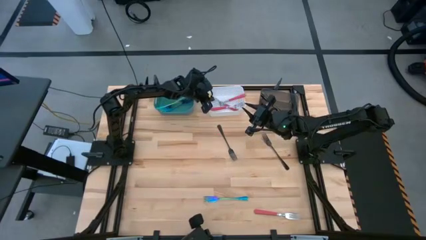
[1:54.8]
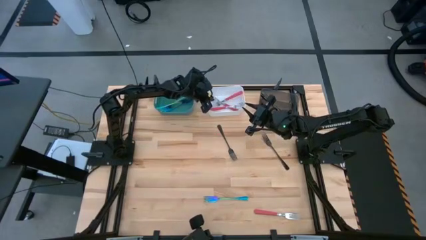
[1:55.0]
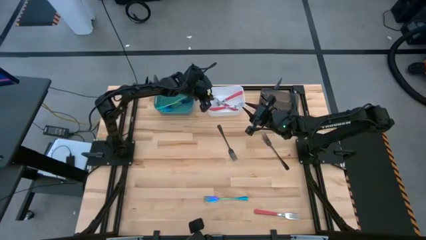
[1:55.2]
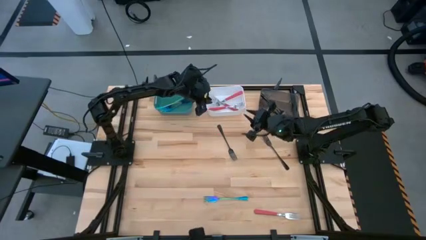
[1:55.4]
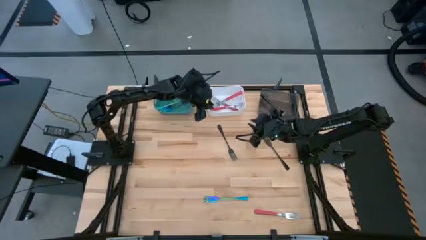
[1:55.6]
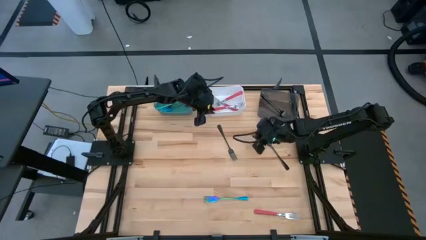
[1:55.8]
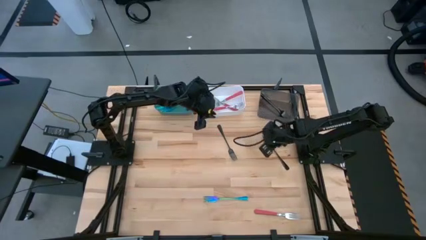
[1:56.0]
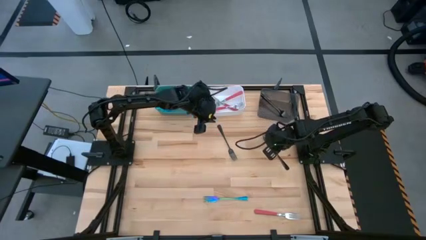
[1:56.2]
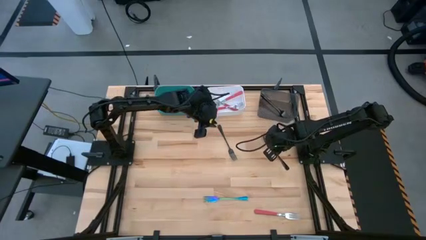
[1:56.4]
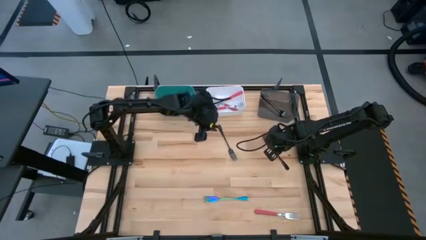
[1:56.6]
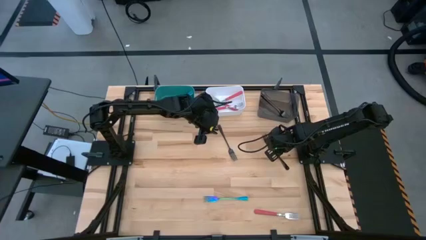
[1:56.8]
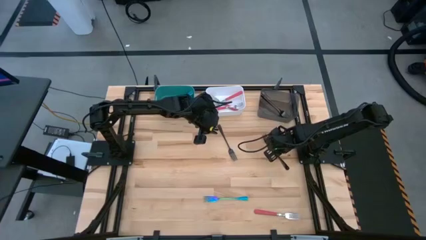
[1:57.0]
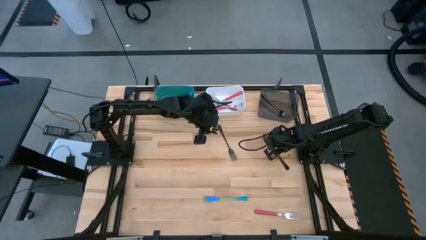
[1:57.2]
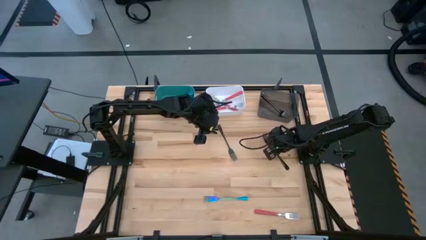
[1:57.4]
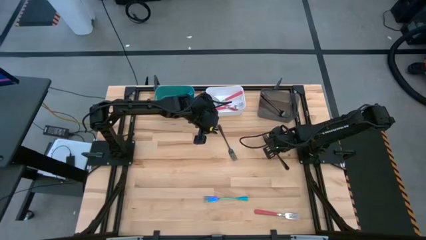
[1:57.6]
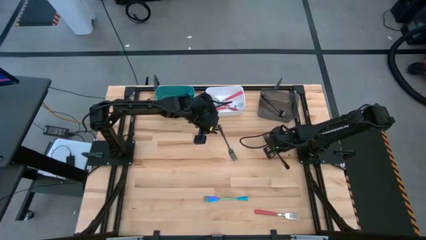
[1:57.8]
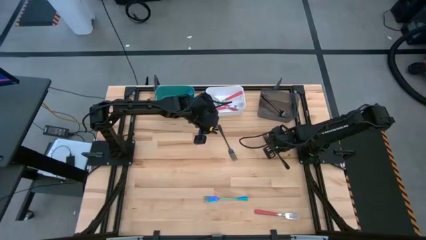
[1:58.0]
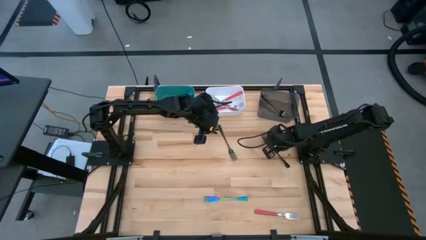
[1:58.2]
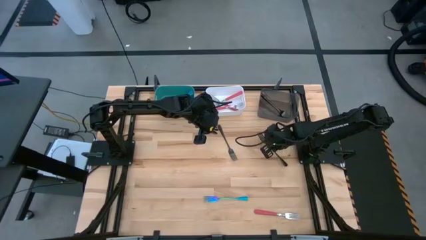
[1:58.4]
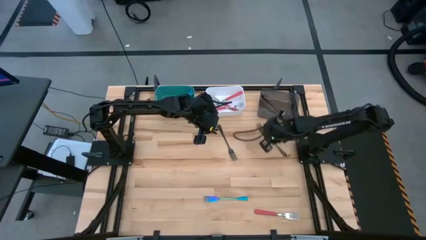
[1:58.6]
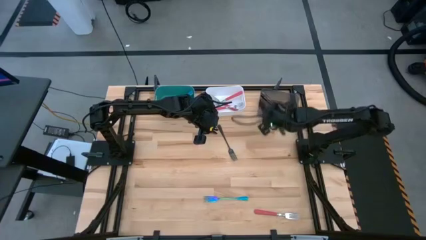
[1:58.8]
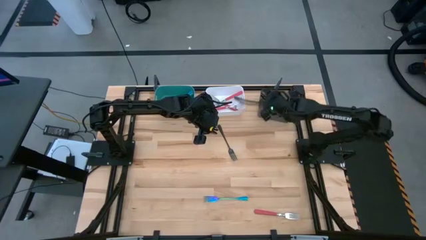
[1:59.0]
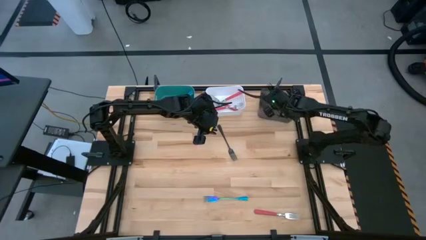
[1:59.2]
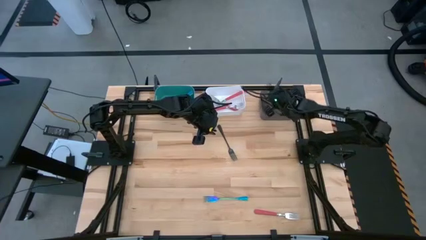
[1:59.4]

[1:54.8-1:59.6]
Task: Sort silverware by color (type)
Put the black fork into the black bin

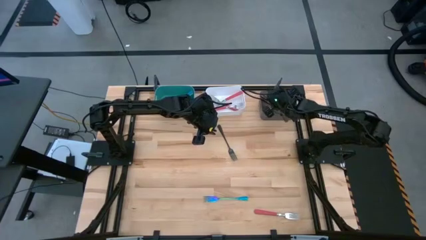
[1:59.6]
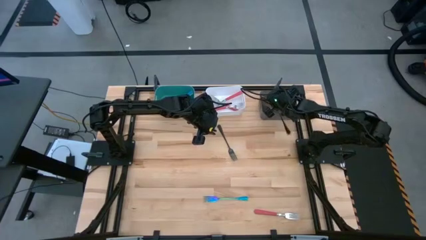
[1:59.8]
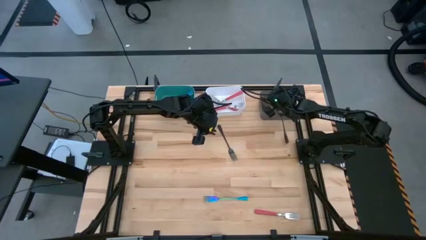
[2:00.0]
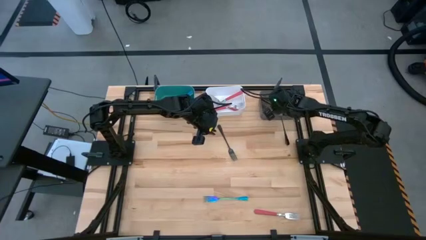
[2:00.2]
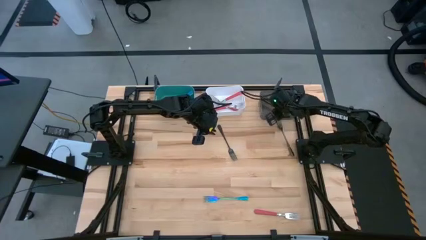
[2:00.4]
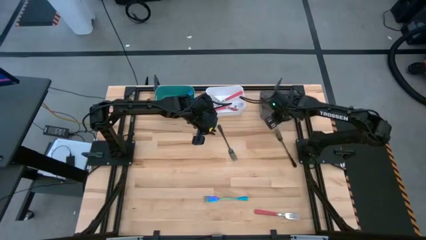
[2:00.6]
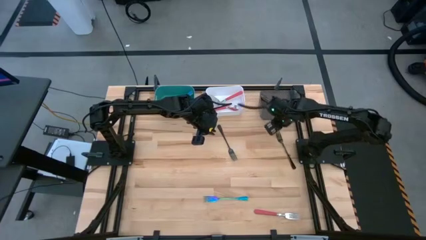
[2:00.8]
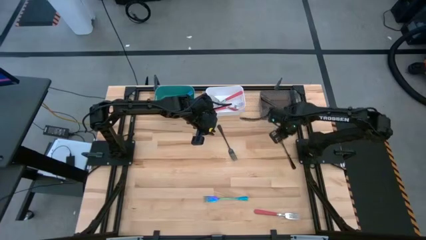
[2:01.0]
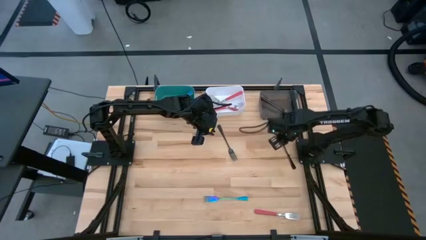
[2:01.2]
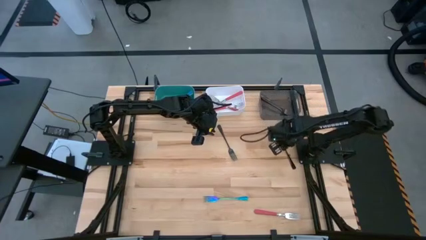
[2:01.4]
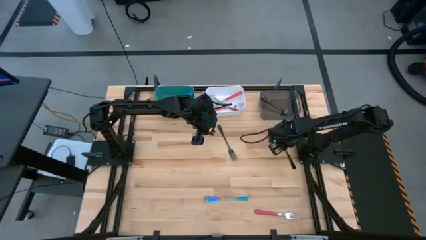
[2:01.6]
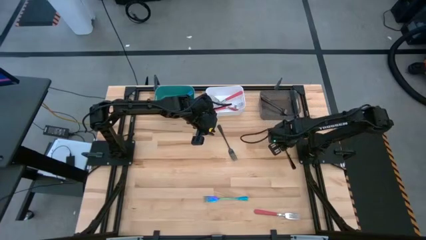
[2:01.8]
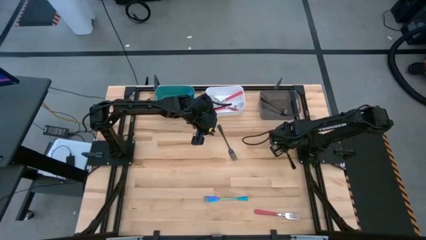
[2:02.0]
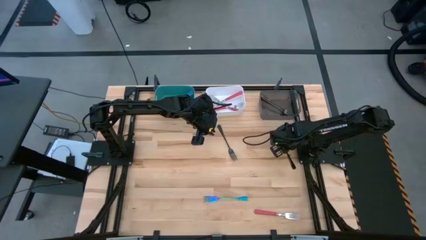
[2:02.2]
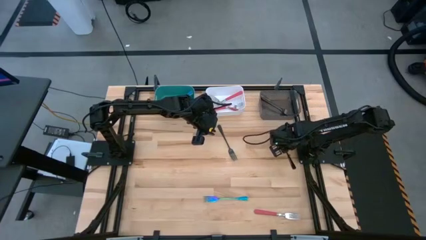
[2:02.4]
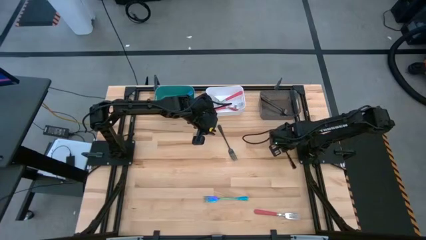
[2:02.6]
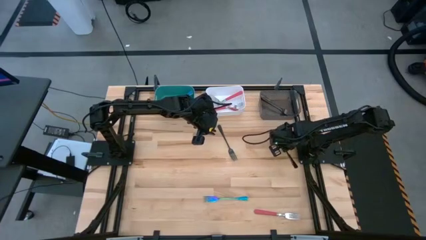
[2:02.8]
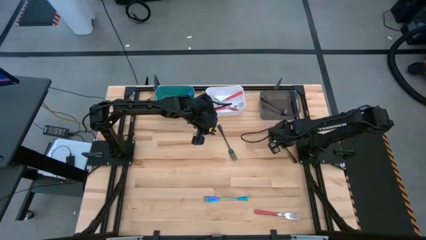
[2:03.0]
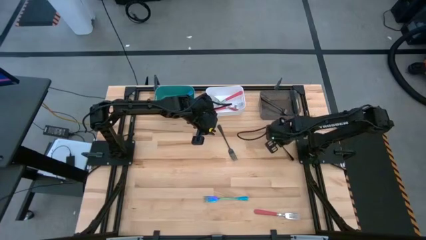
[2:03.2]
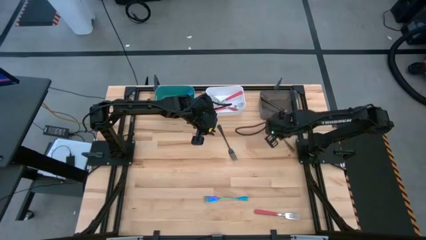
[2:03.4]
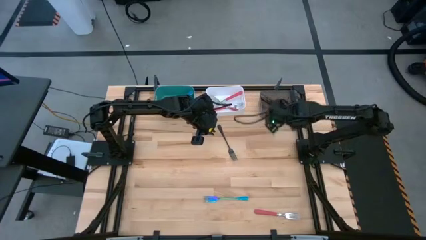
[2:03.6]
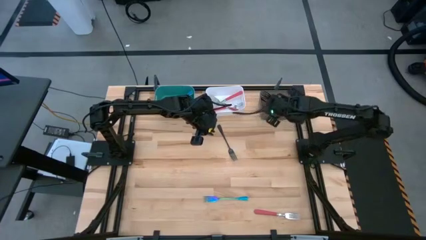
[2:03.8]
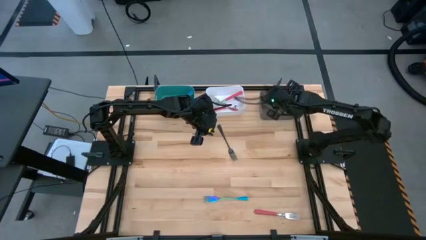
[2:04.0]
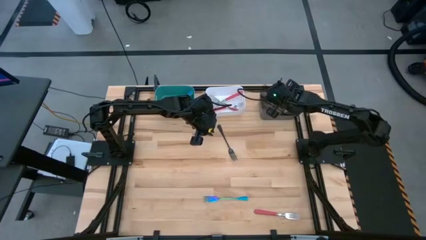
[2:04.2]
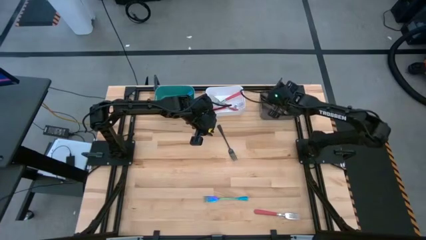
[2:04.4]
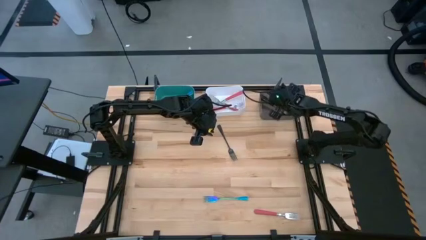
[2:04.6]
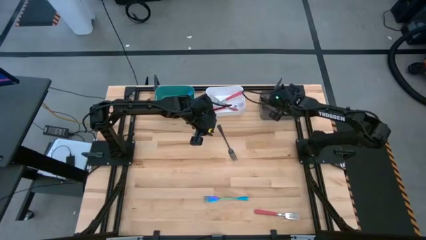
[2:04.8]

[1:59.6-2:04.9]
Put the black fork into the black bin

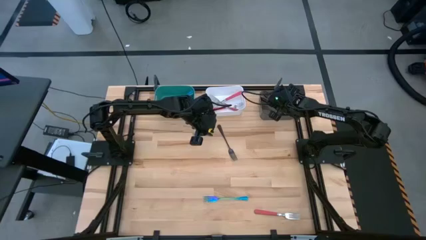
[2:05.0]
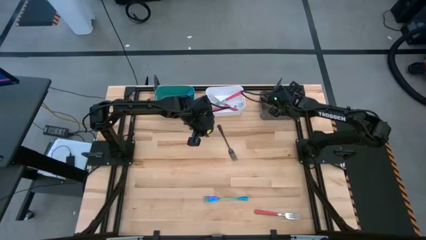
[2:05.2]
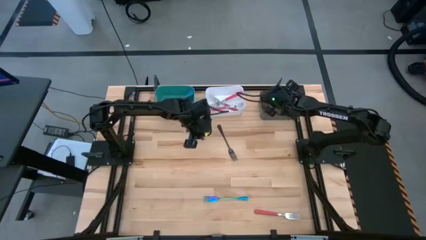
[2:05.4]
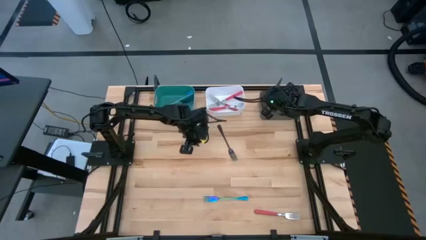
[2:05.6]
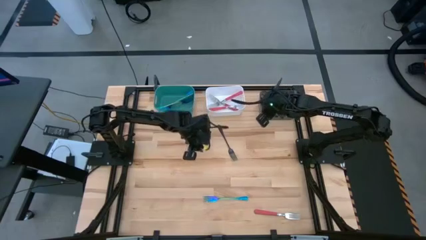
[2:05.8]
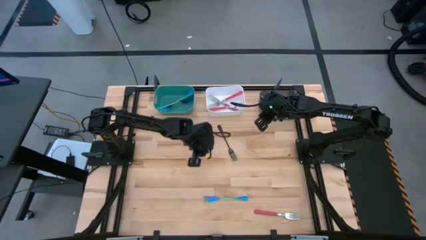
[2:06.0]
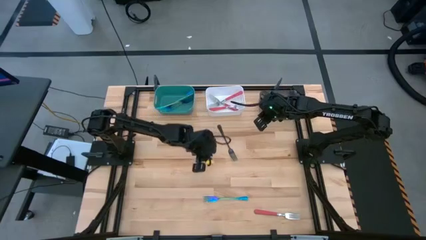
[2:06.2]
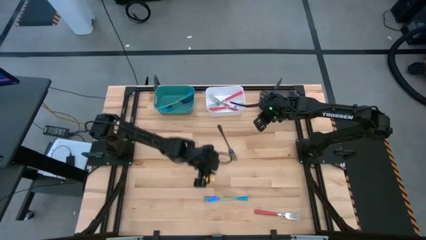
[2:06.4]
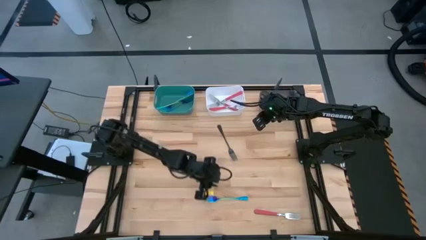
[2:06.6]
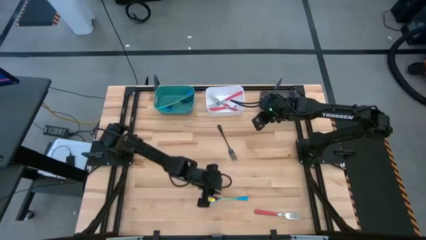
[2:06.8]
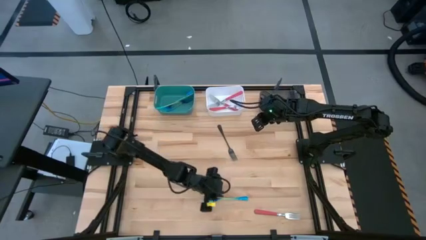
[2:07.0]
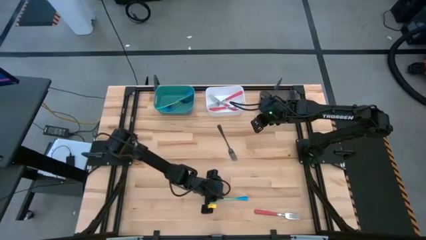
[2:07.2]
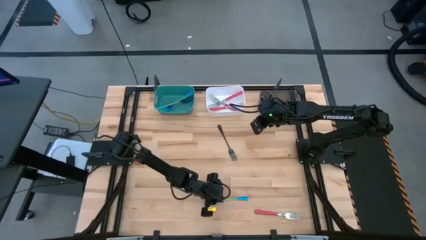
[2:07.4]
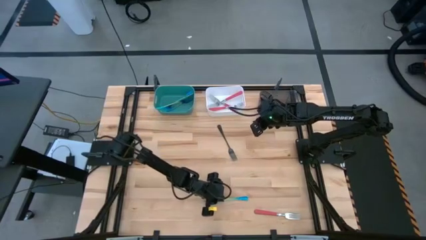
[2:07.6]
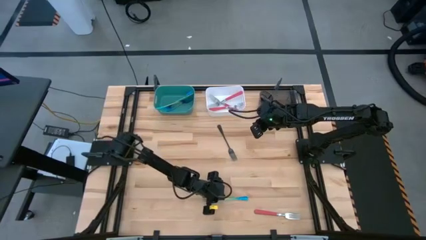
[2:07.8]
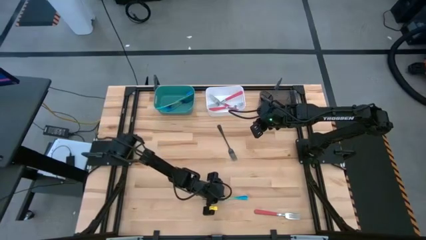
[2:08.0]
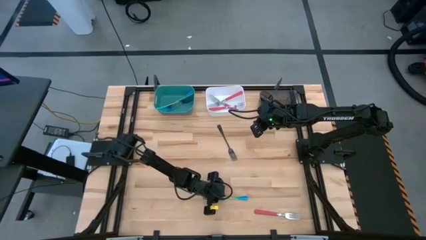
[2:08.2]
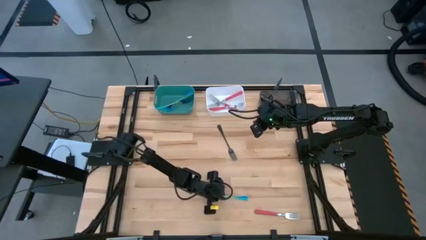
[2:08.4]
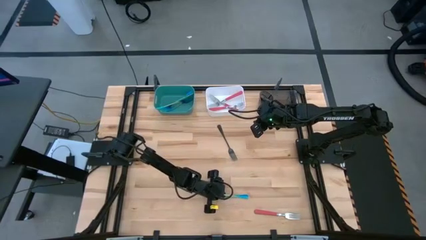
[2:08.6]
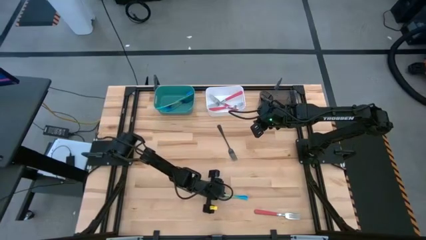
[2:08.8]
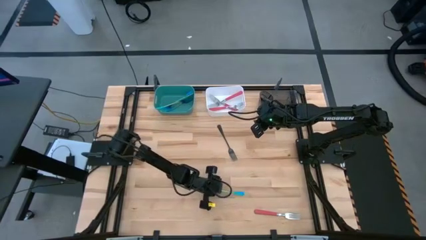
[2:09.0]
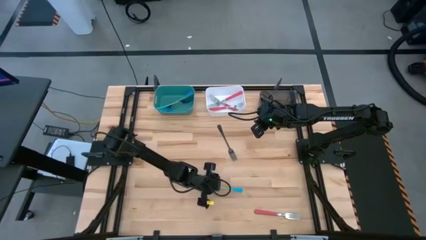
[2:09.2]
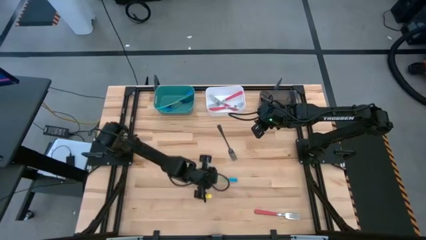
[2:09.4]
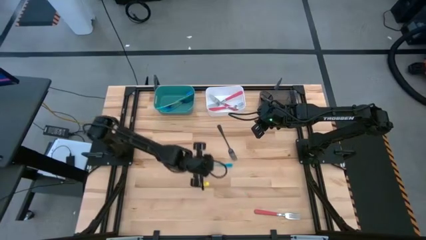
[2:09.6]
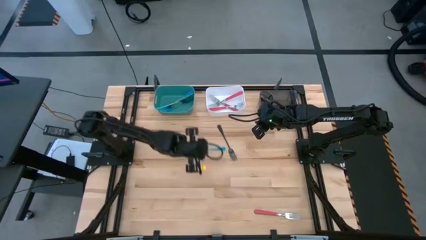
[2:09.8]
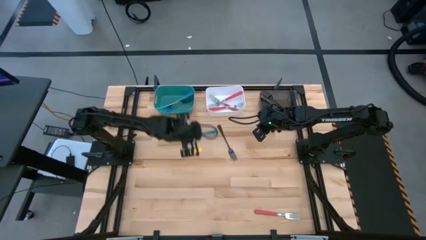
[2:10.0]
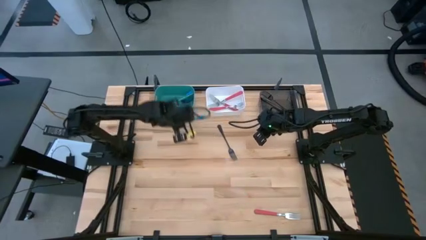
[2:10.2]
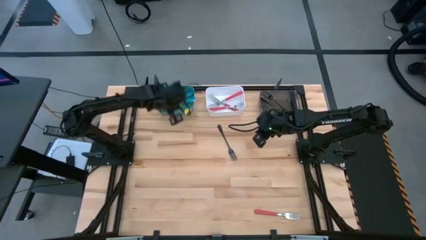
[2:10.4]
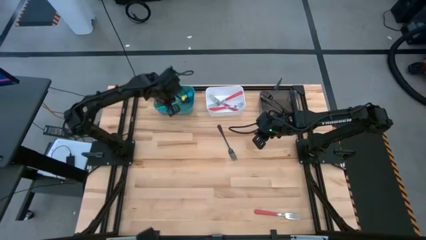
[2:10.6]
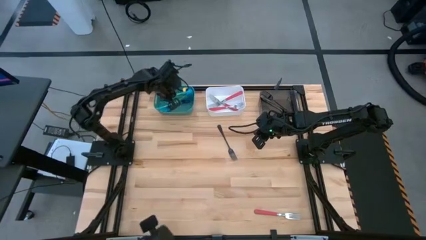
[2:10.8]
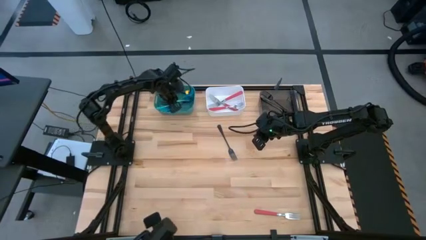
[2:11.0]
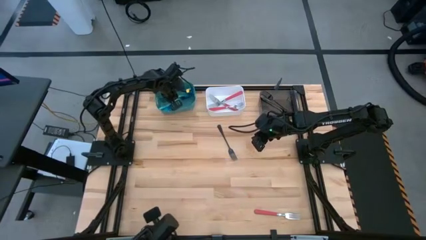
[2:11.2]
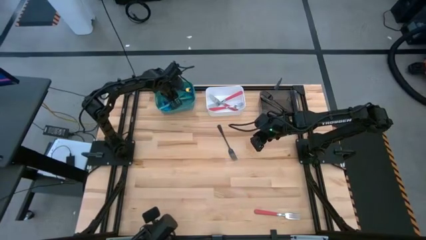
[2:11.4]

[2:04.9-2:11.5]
Put the iridescent blue fork into the green bin
